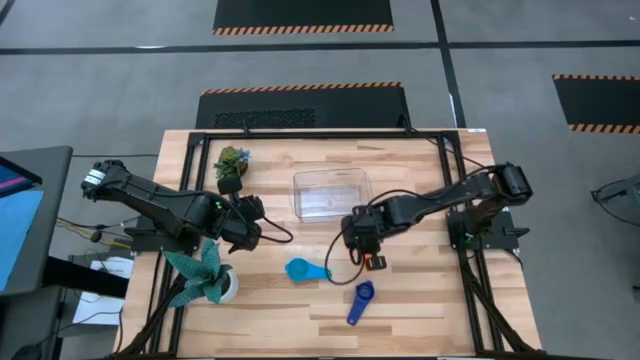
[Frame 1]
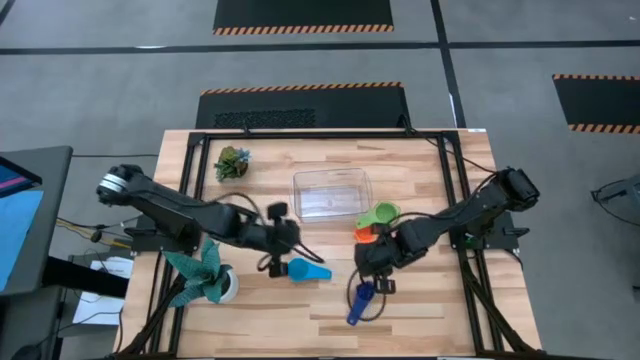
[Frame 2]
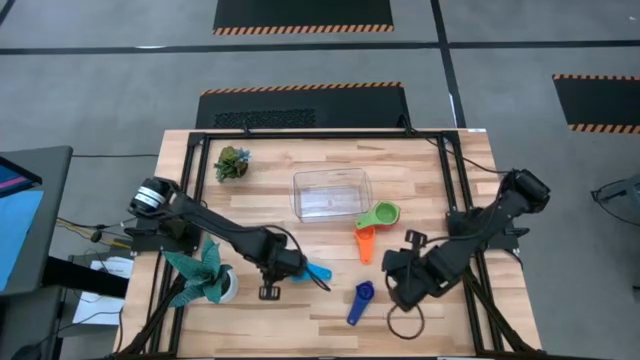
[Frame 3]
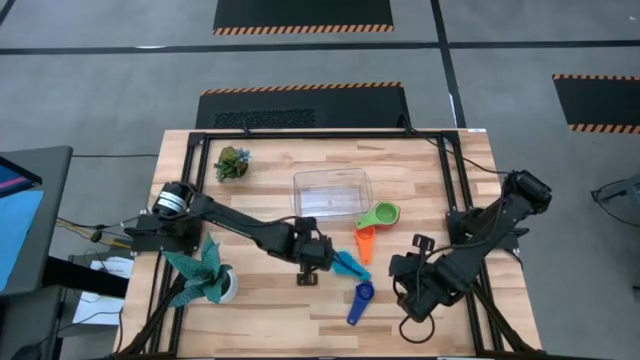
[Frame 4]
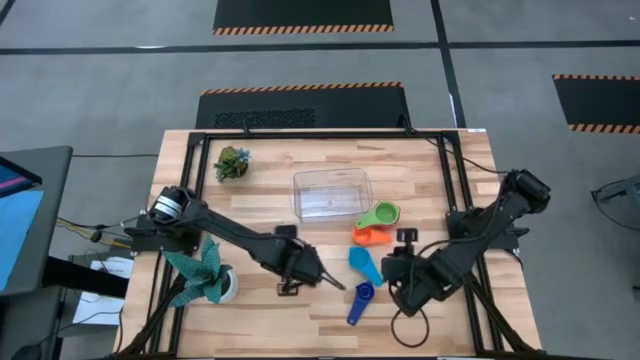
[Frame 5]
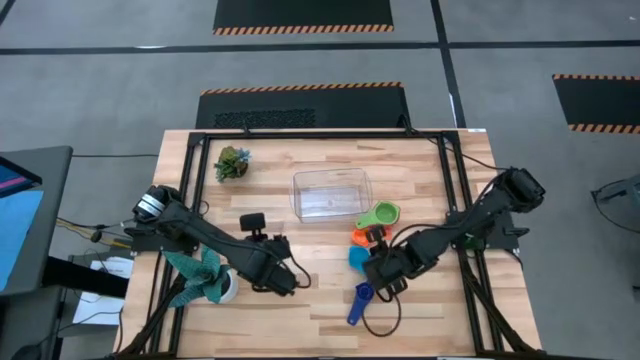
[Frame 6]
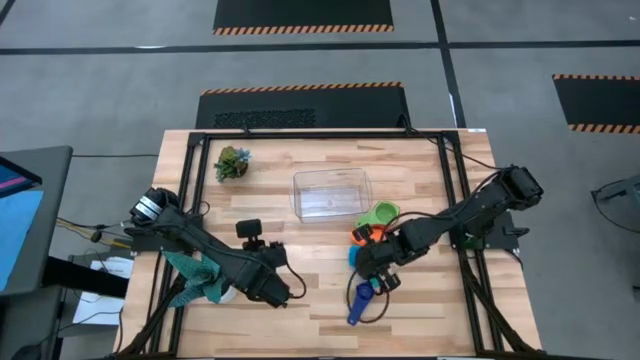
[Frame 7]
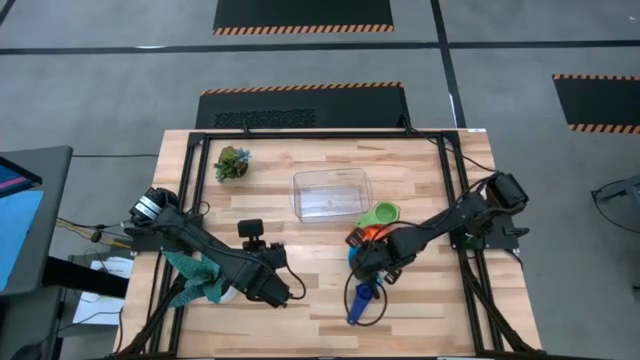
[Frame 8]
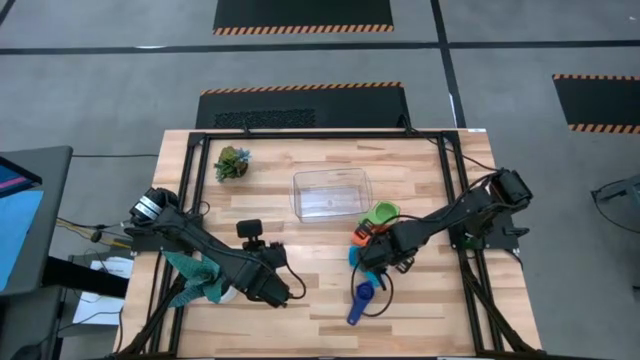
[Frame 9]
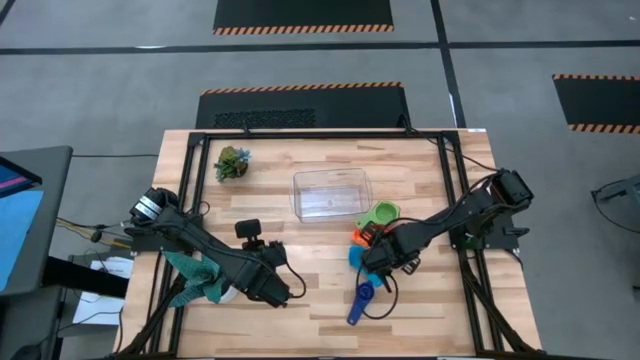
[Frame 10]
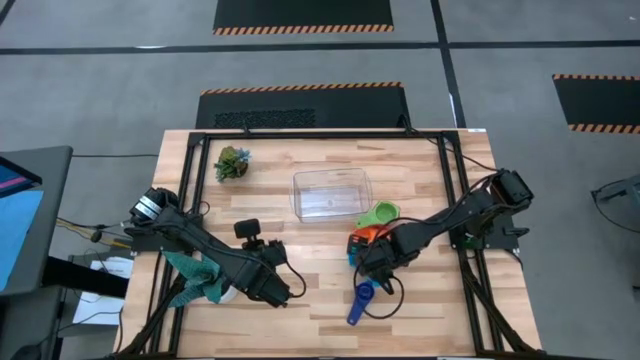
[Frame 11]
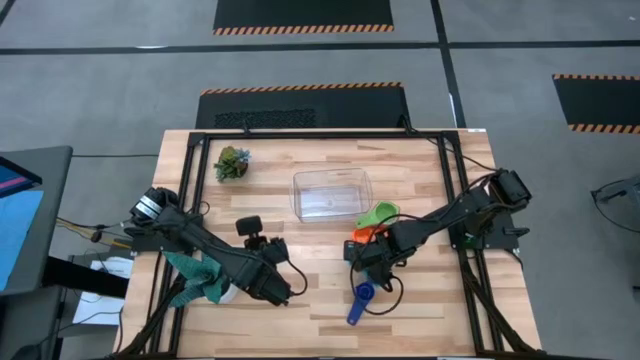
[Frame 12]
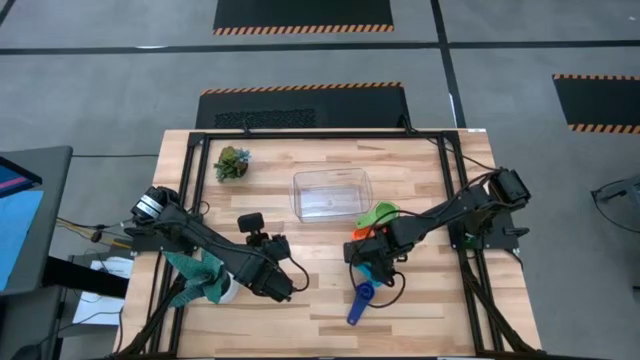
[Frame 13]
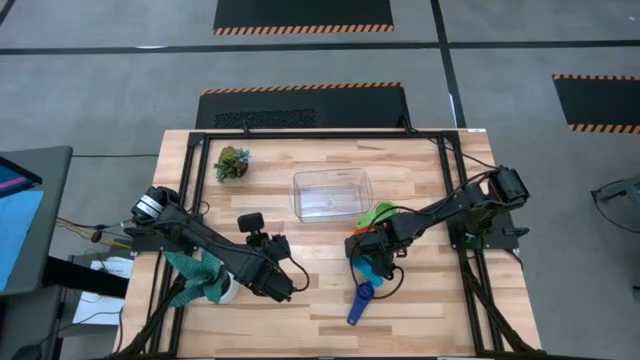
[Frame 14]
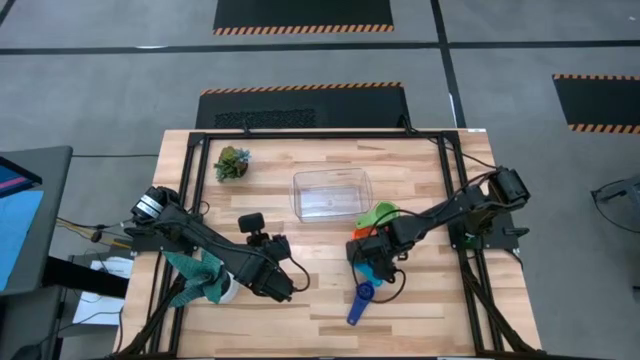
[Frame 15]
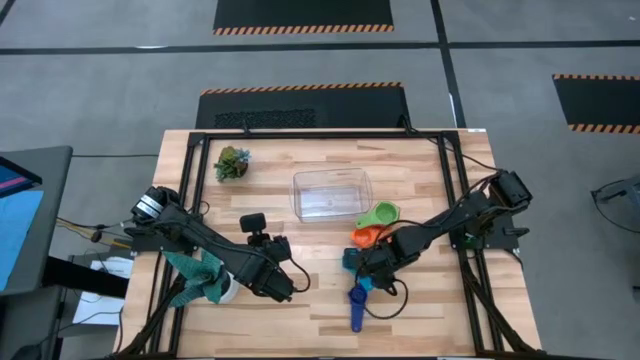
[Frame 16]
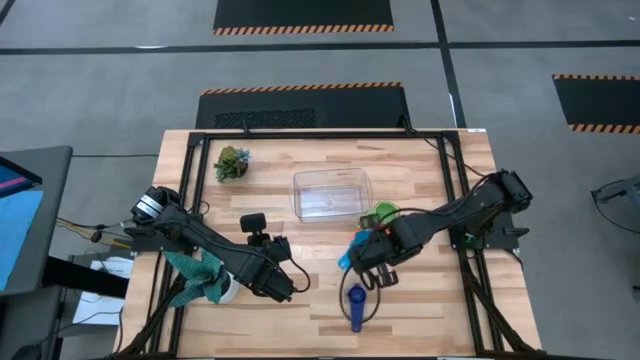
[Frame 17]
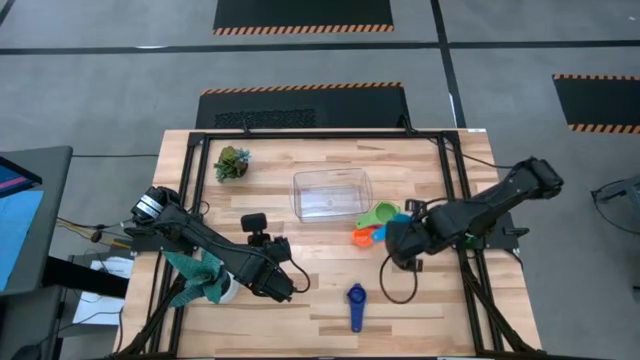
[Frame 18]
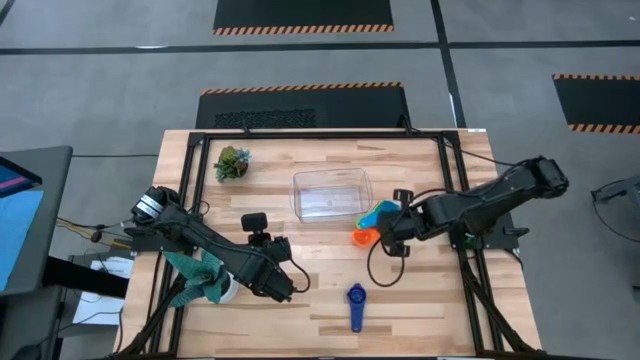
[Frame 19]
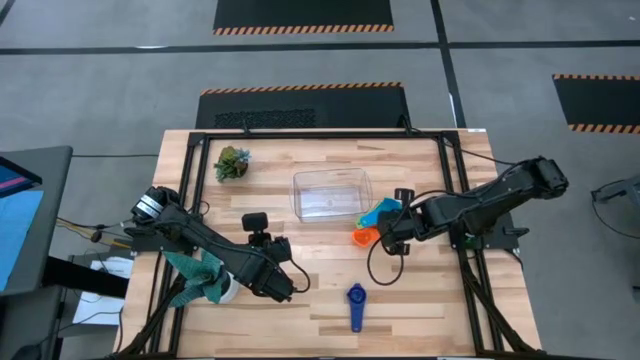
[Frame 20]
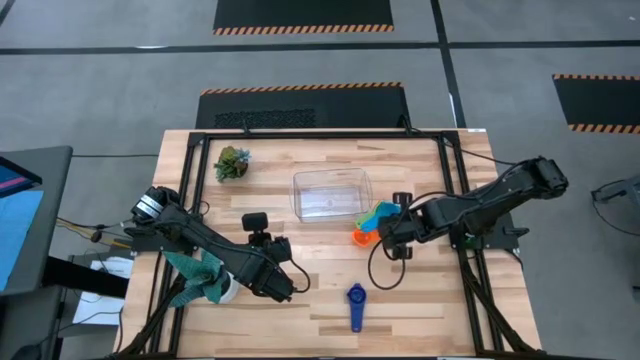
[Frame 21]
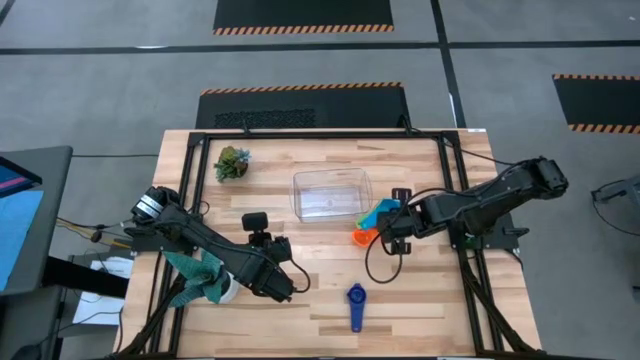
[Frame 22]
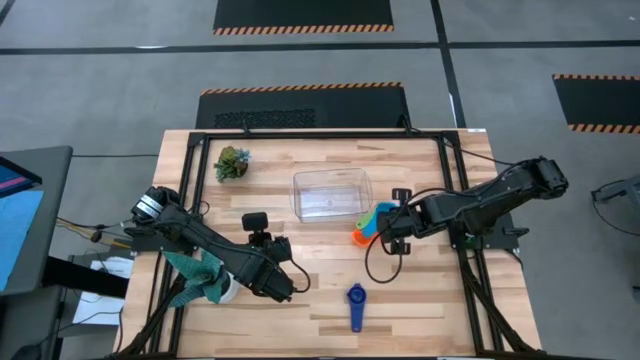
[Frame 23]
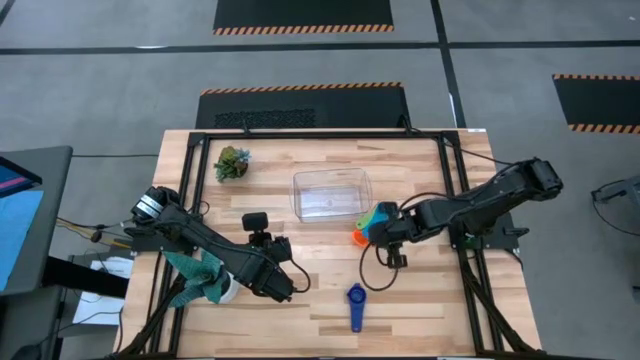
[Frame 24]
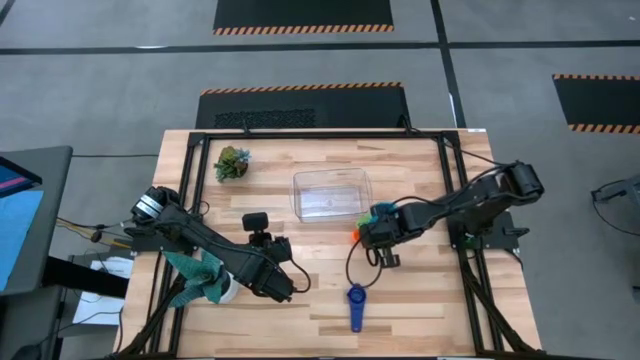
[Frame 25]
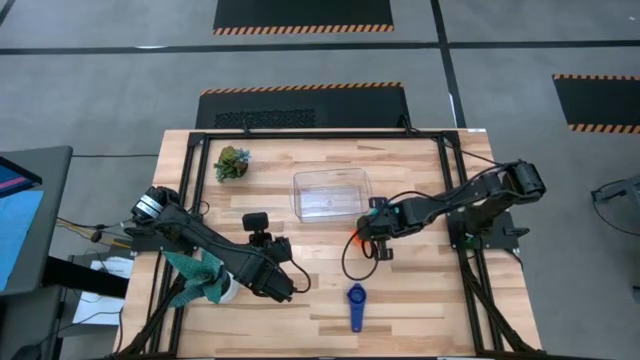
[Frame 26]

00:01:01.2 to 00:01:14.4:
Task: Nest measuring cups in basket
Stack the light blue measuring cup on top of the green measuring cup

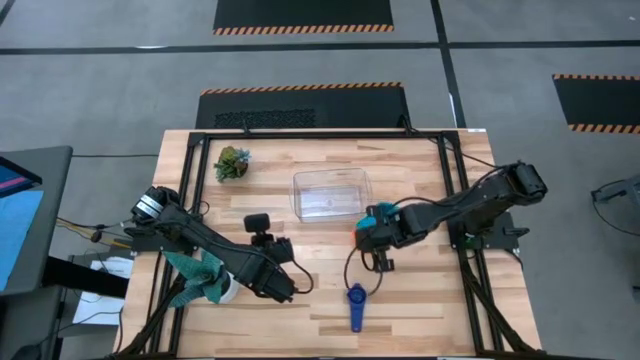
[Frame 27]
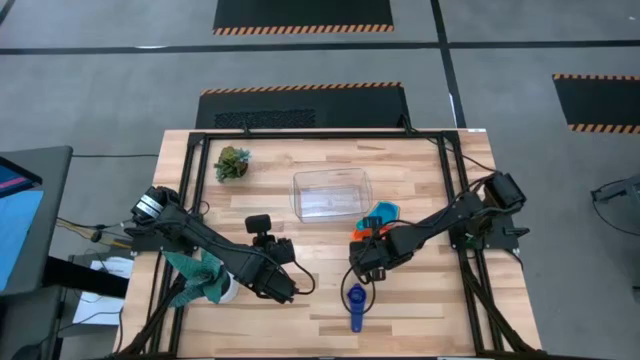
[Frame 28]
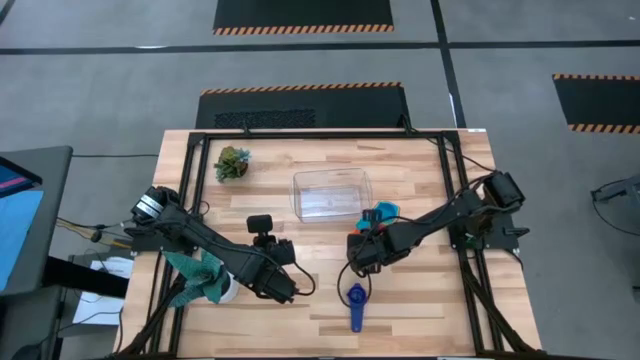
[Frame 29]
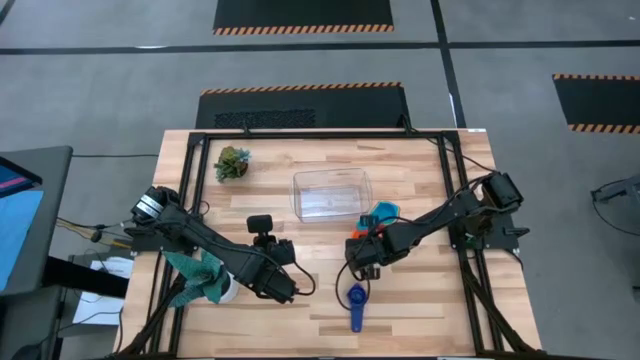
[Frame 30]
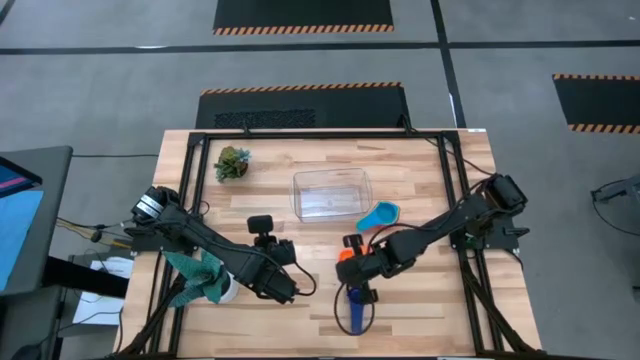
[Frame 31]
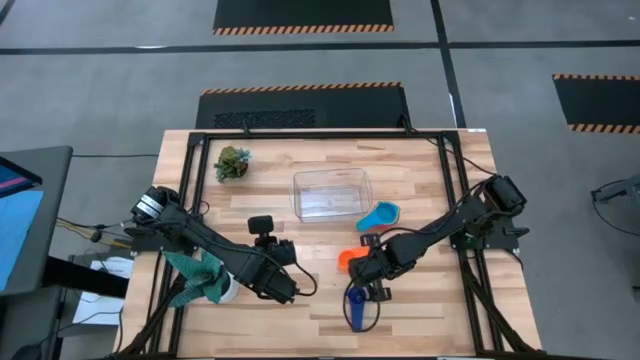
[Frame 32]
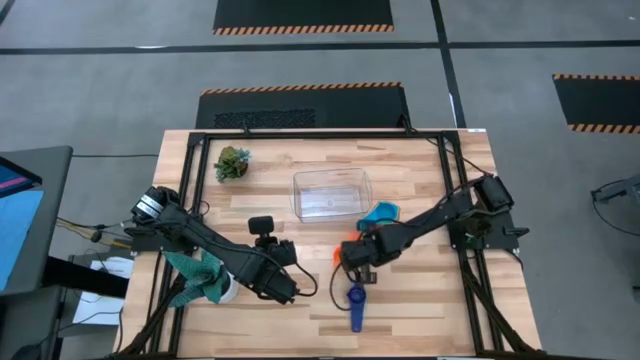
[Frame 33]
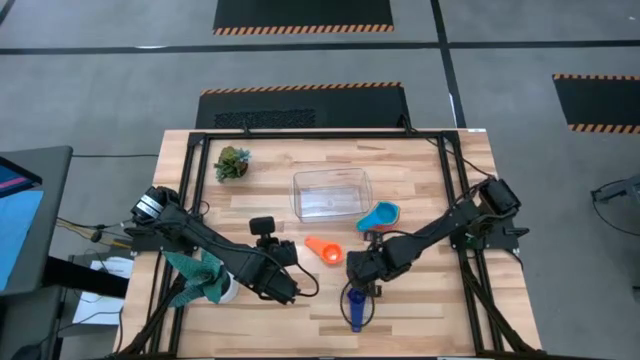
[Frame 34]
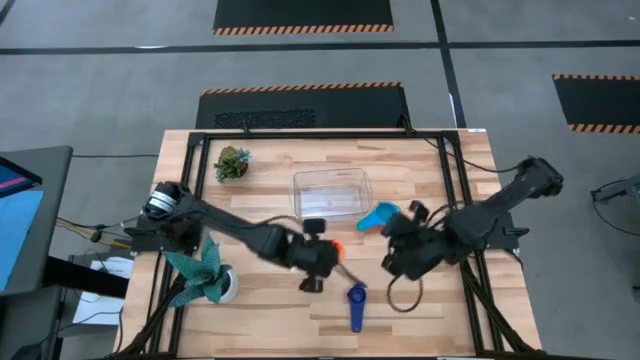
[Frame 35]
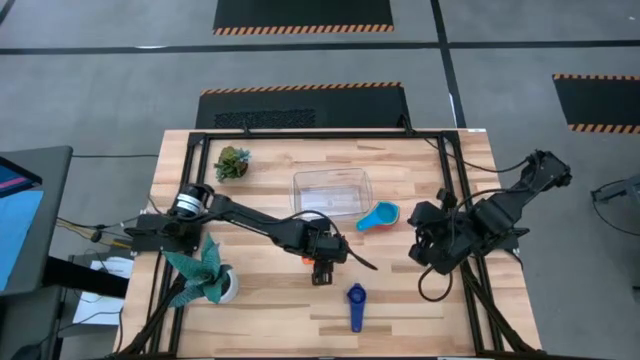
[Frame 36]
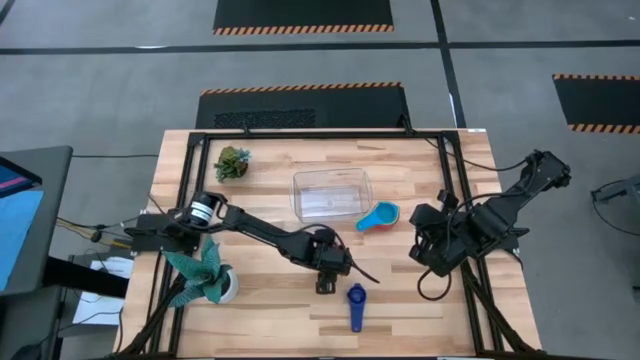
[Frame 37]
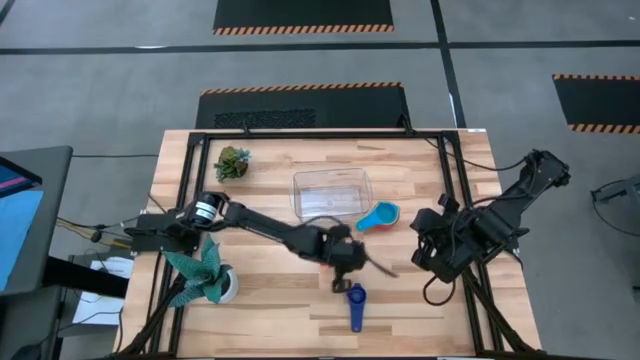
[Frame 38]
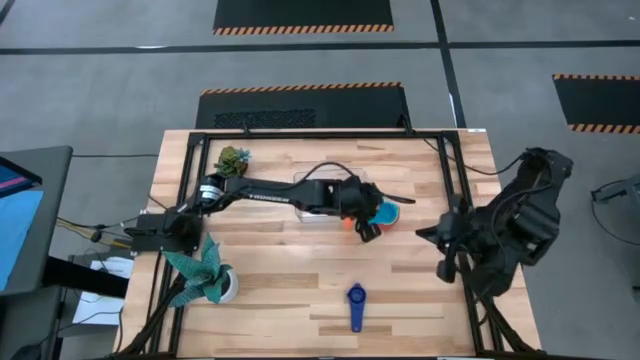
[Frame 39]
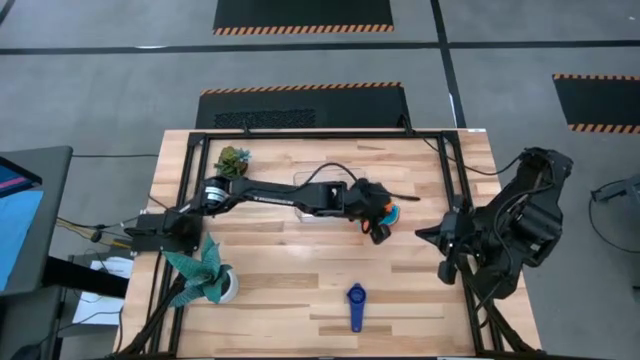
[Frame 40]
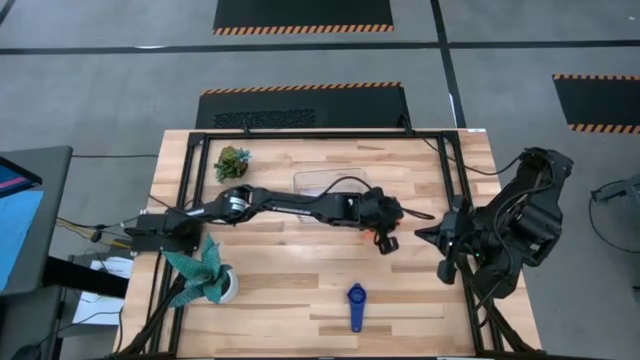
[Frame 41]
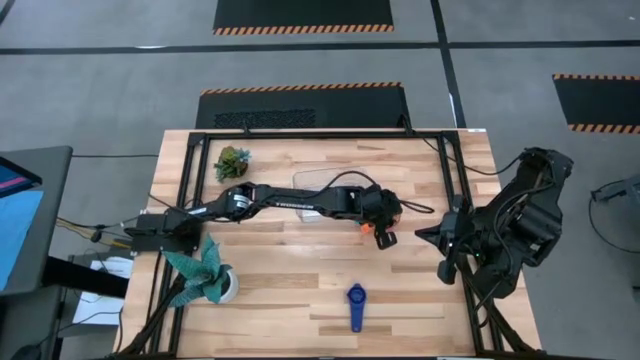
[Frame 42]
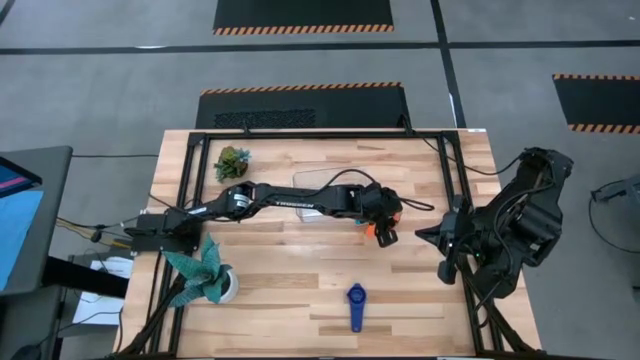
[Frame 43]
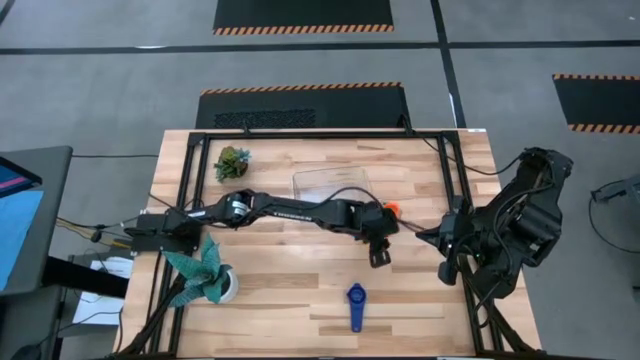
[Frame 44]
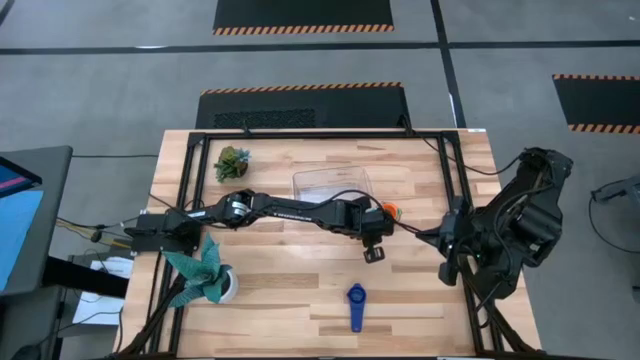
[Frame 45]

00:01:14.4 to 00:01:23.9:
Stack the orange measuring cup on top of the light blue measuring cup
